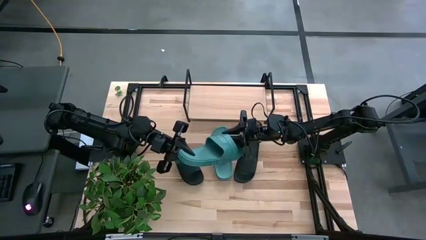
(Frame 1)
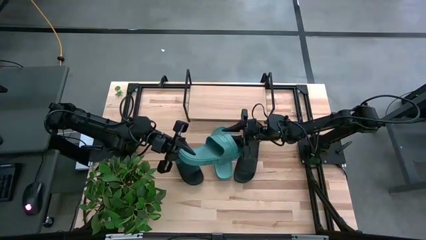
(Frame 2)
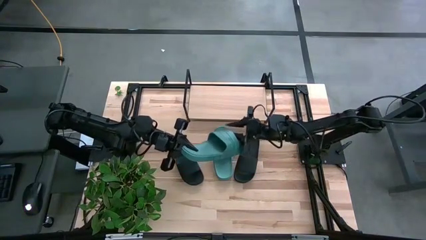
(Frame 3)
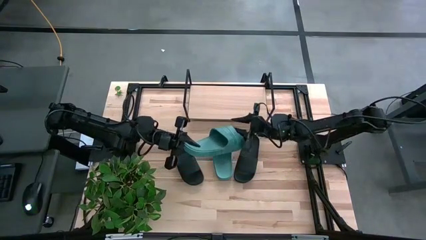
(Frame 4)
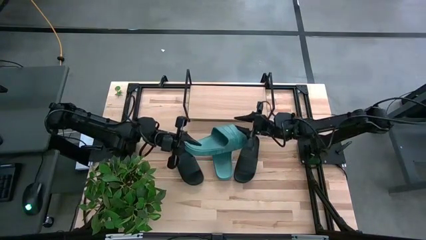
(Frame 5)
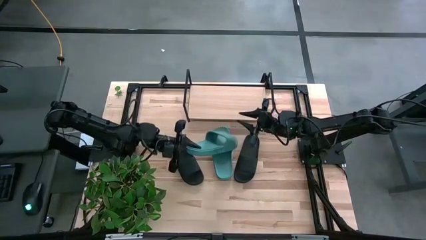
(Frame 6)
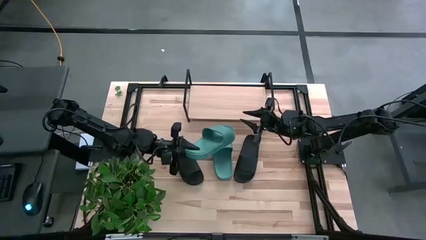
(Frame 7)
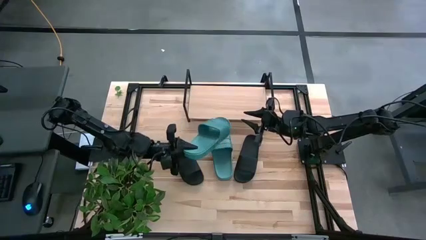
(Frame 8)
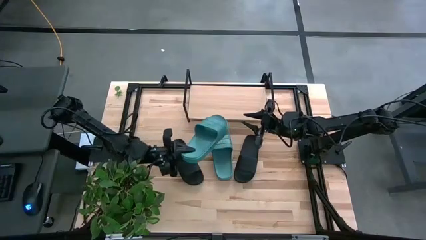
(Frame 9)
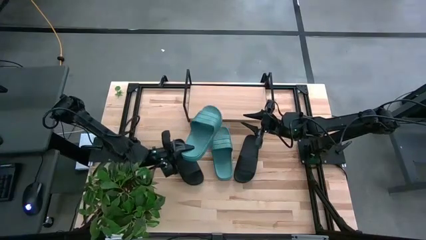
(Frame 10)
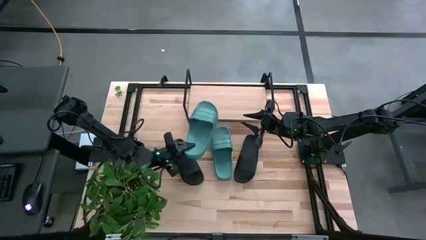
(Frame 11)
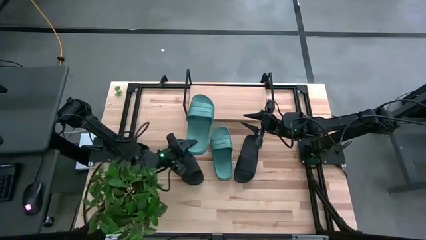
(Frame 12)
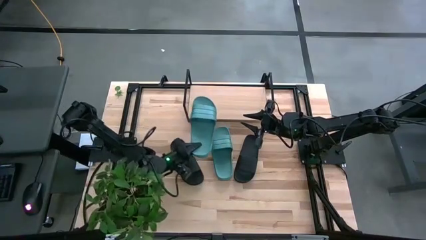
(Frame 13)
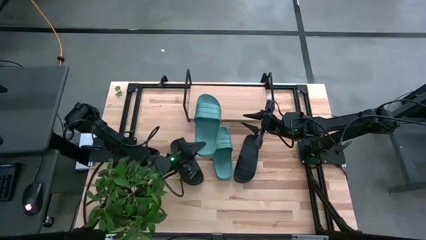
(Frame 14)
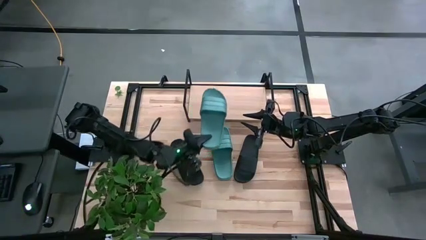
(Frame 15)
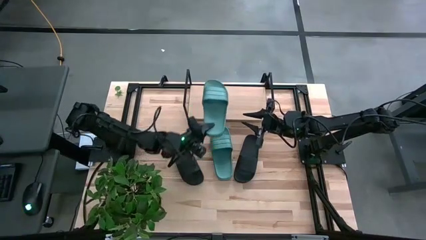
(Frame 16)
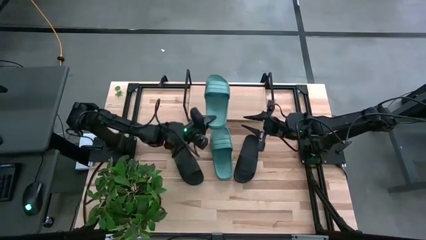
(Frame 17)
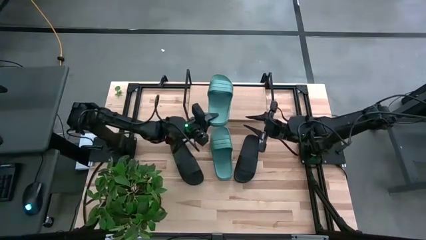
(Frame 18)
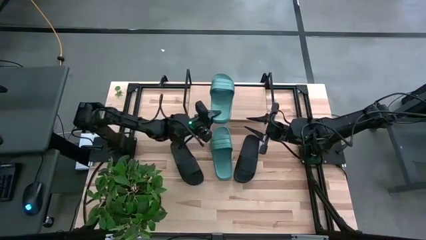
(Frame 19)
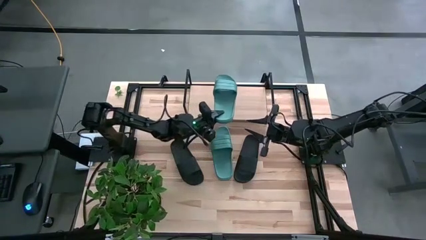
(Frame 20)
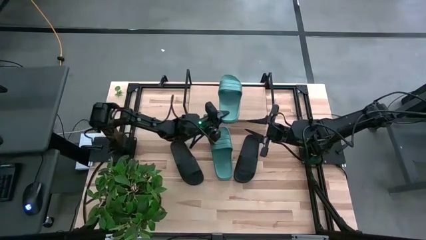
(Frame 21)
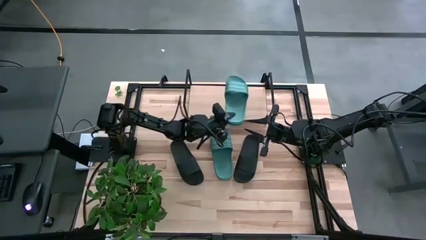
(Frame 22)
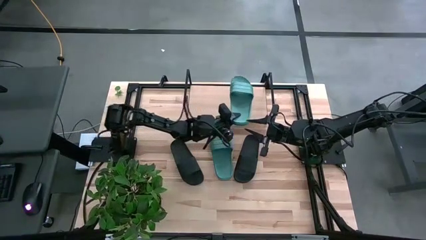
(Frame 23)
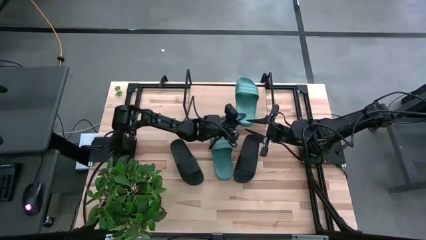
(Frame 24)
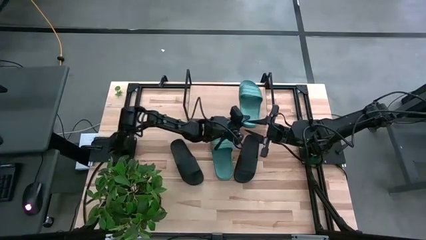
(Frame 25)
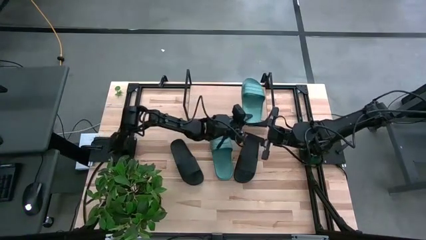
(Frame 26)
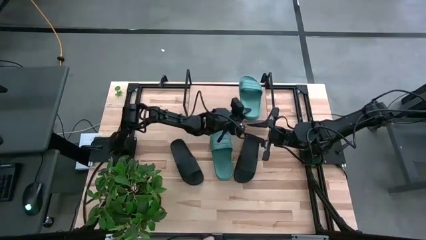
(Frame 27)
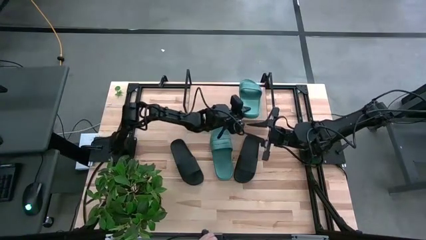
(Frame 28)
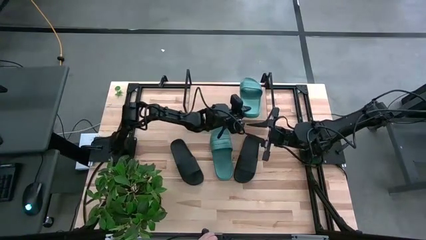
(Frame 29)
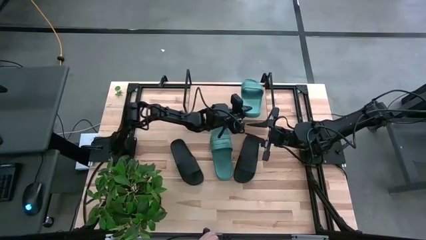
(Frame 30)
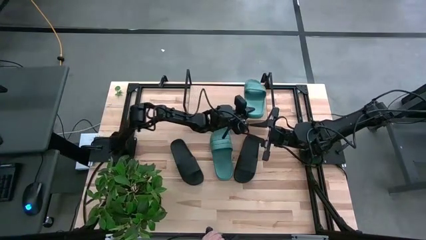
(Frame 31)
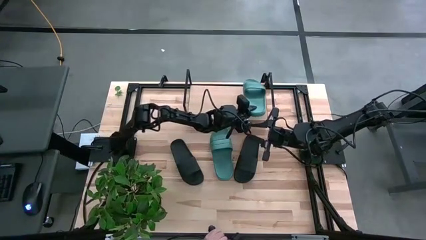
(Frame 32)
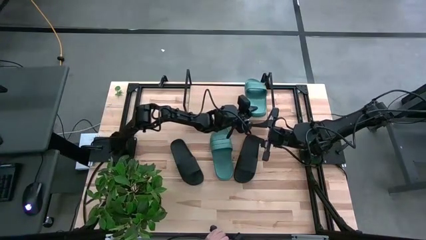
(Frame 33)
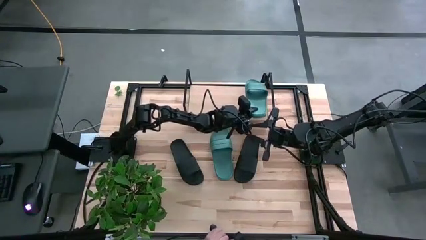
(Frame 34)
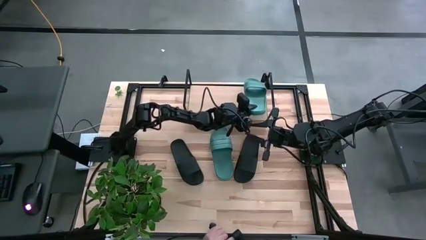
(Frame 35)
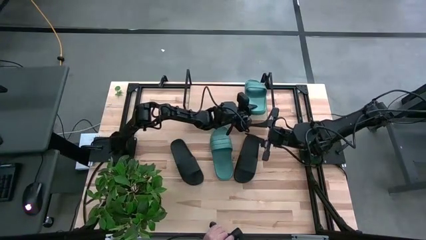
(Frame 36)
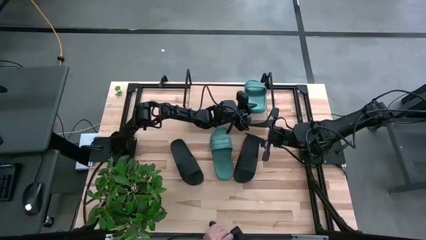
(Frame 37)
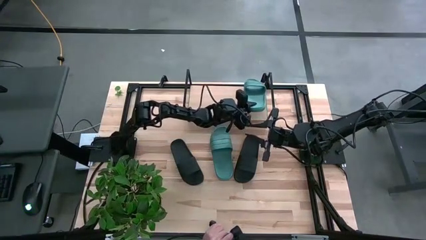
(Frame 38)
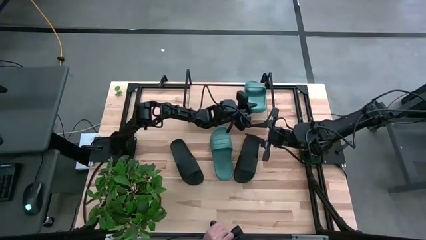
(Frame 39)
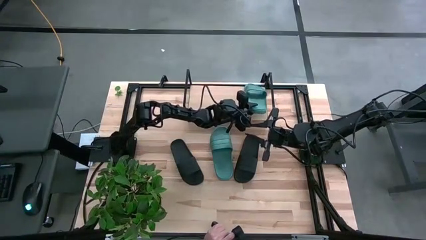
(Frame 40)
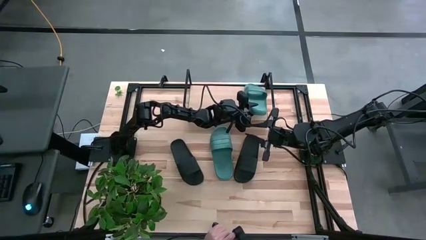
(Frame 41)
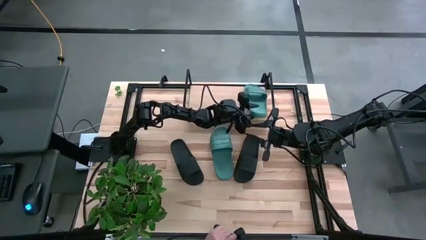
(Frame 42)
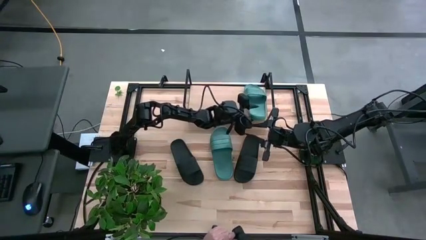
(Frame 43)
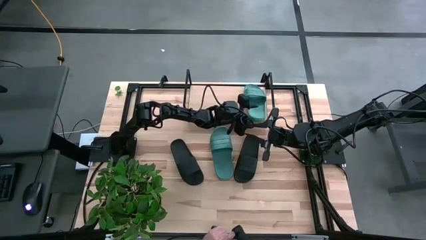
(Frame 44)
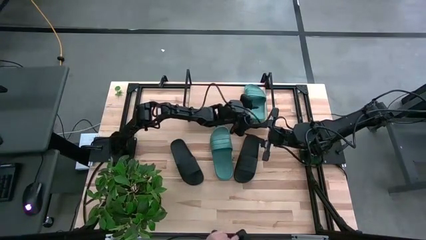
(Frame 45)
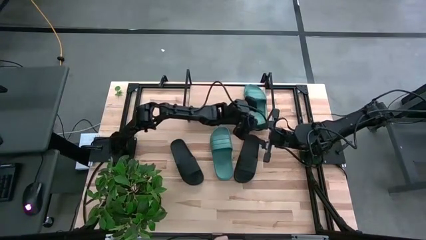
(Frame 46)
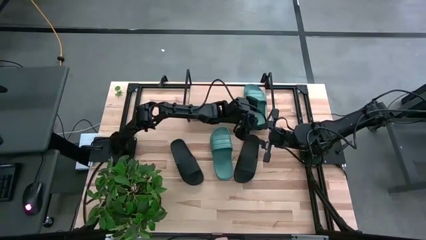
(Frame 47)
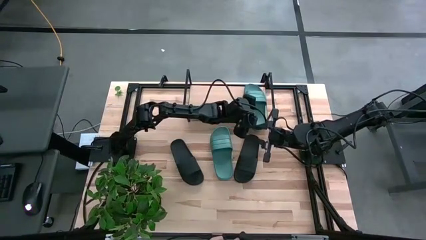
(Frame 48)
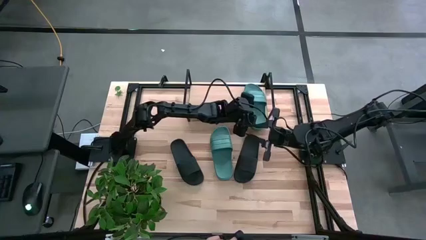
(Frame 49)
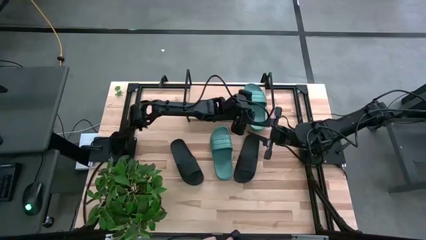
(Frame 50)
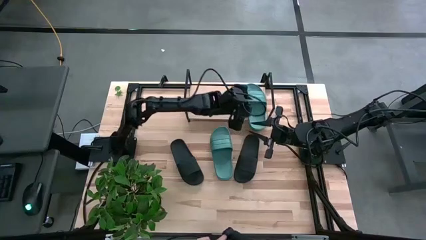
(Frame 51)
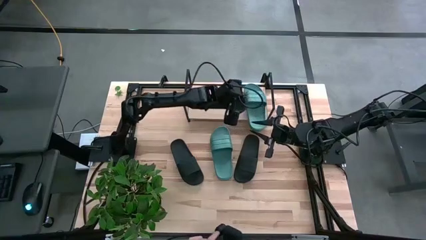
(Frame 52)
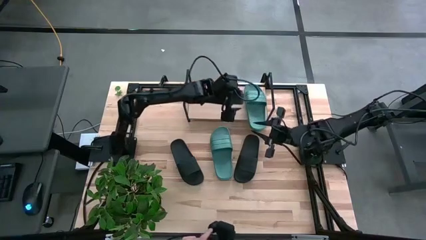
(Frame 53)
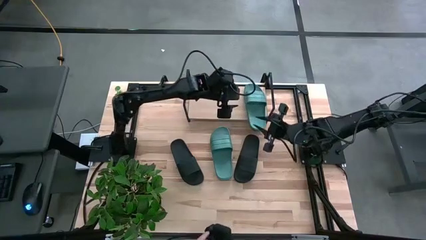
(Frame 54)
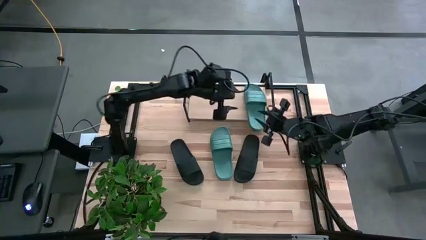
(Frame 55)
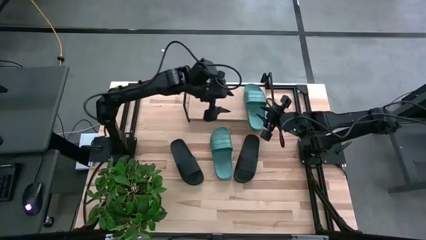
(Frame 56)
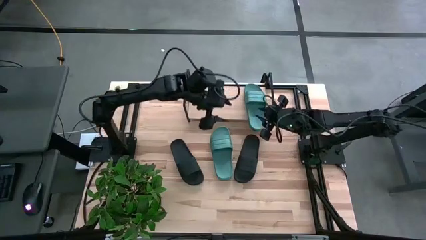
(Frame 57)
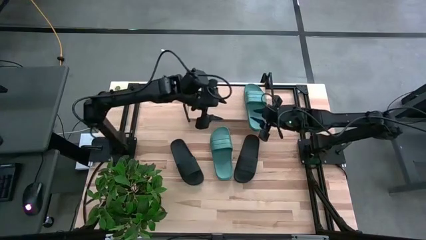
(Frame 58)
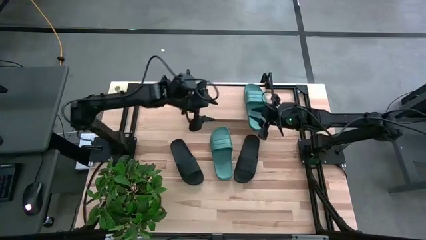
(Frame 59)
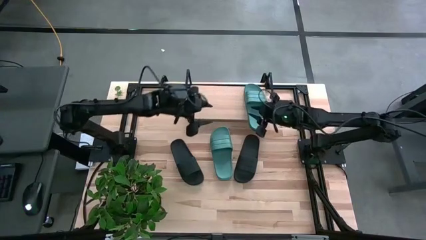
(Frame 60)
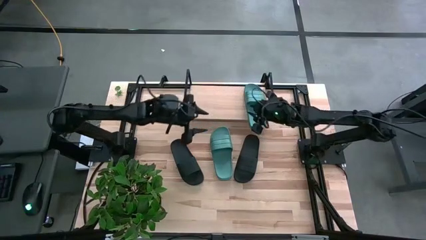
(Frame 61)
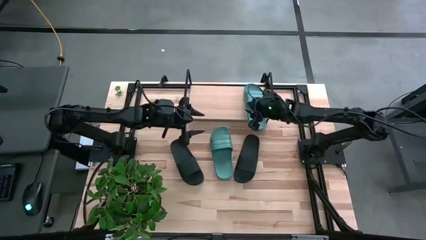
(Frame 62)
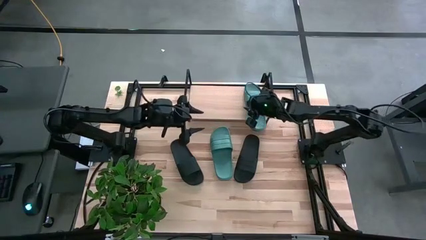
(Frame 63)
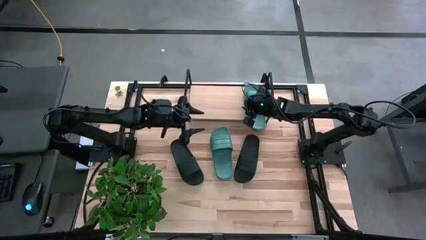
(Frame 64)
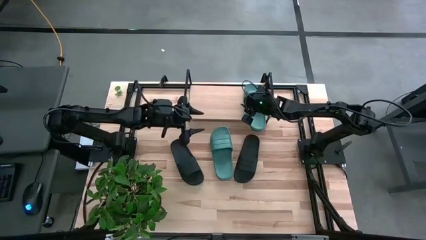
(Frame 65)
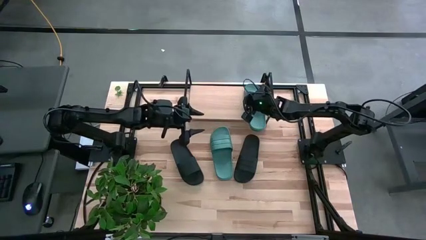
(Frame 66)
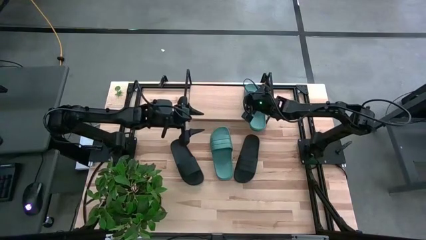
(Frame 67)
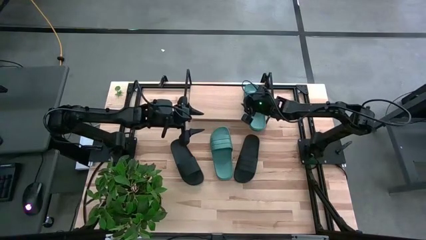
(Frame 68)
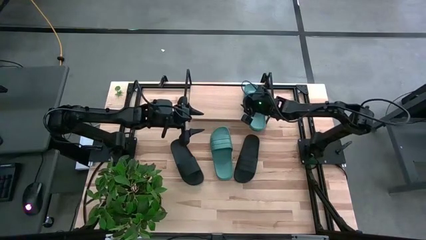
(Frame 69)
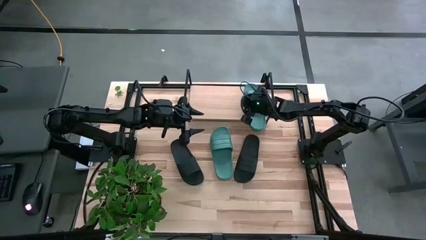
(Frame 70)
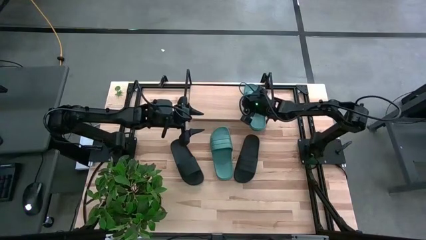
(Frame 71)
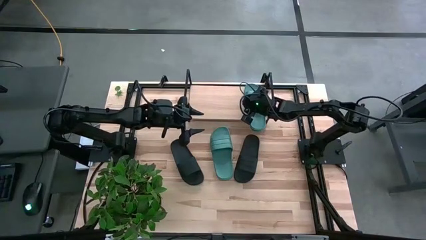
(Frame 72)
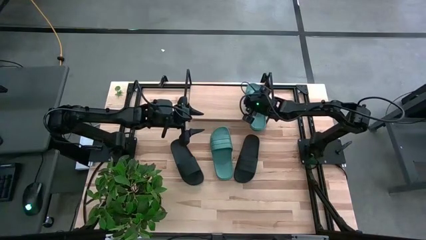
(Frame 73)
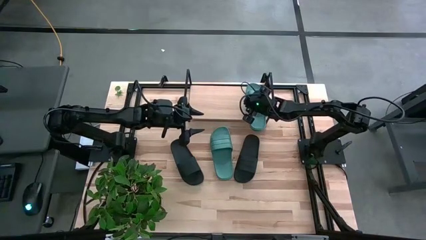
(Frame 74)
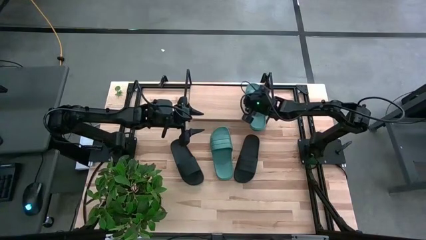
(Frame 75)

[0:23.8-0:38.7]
Task: Pick and place slides into the shelf
Put the bottom green slides on the shelf

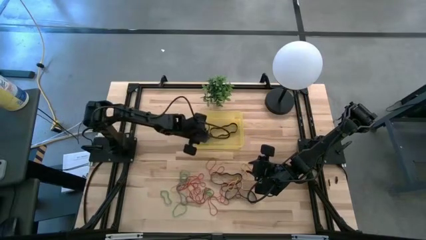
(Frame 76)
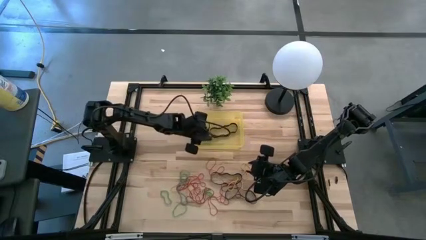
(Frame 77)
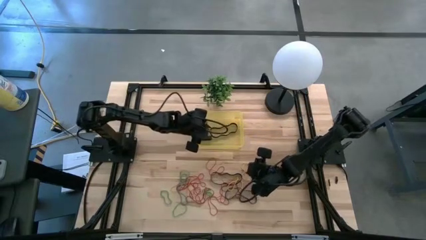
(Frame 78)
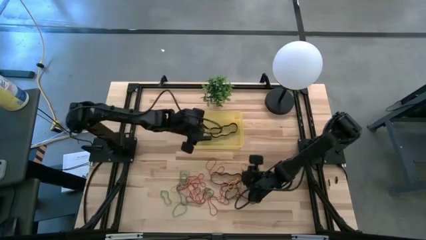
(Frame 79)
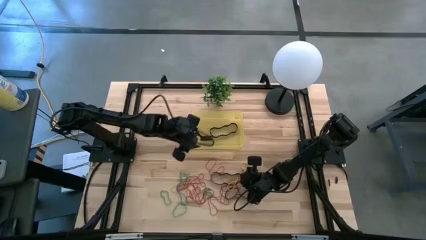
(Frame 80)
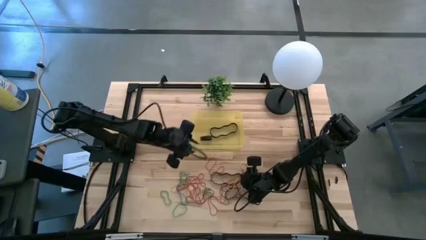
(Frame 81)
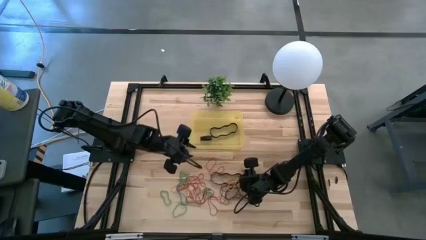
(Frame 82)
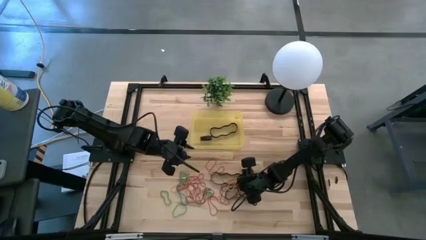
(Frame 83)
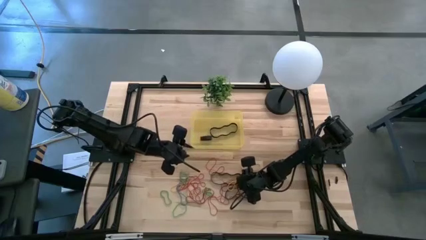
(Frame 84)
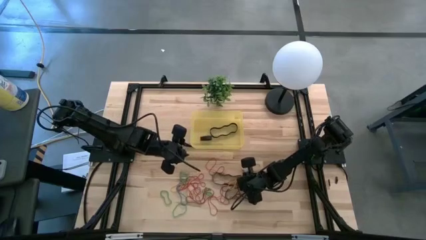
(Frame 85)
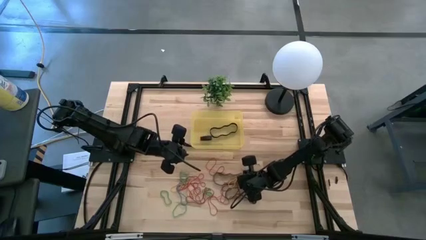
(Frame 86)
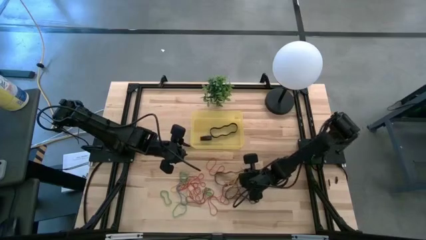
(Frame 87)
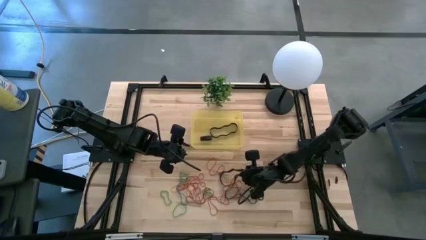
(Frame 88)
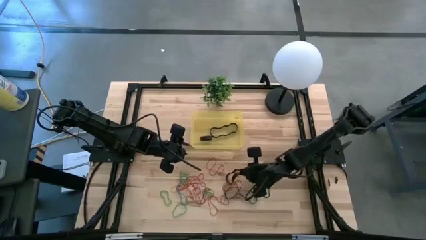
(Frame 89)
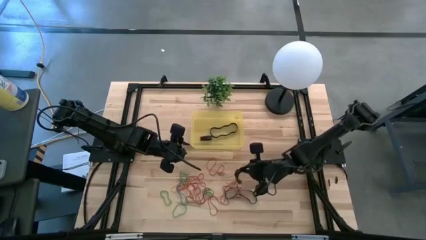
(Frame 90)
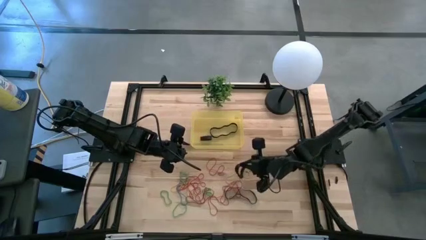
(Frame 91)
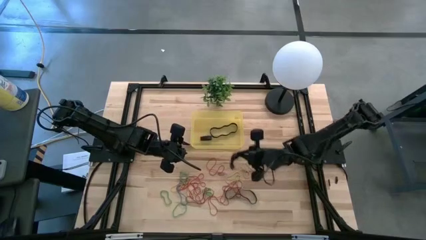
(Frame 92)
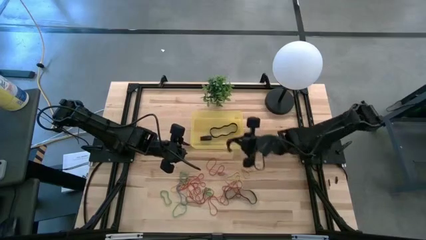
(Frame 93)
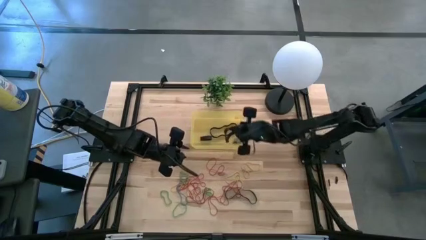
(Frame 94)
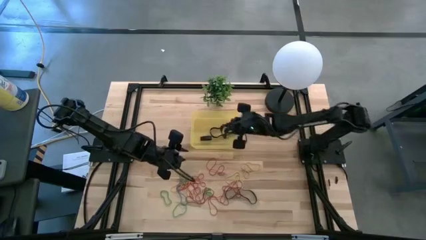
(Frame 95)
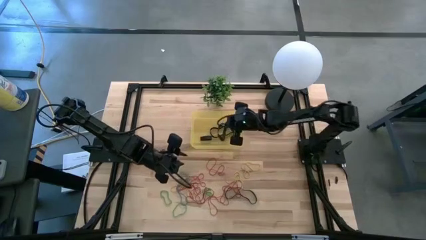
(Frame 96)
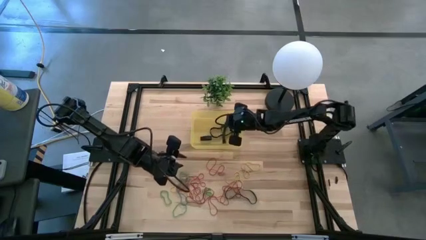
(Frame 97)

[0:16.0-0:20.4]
Task: Pick and place rubber bands into bin
Put the black rubber band into the yellow bin
